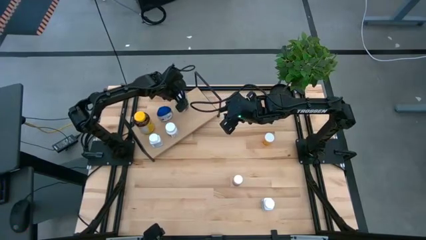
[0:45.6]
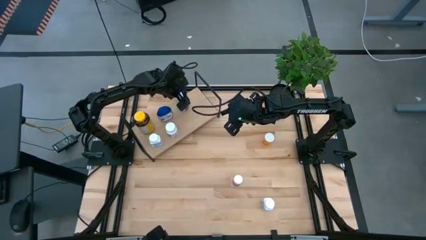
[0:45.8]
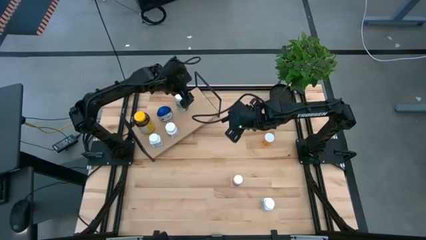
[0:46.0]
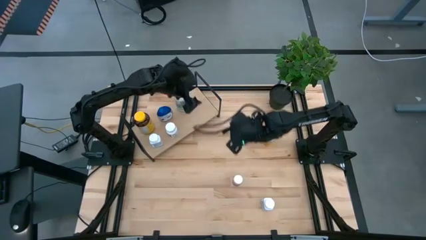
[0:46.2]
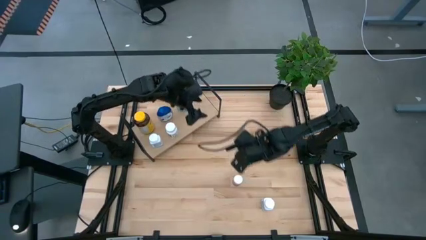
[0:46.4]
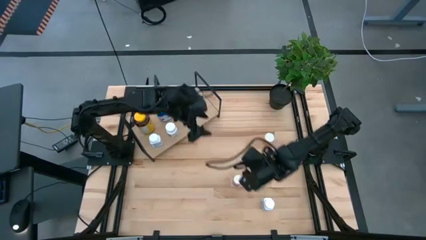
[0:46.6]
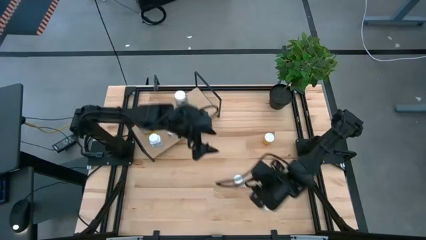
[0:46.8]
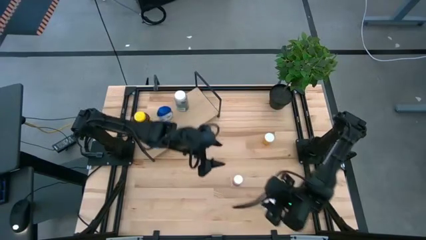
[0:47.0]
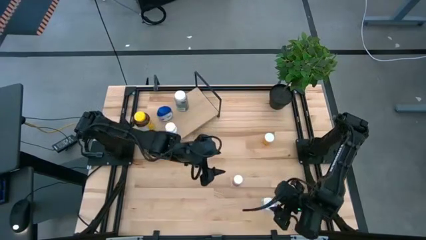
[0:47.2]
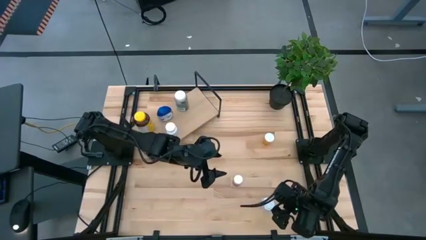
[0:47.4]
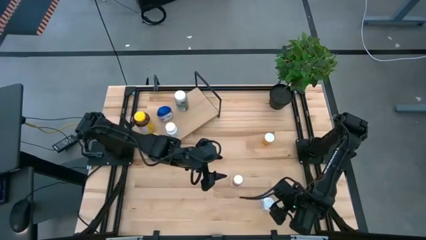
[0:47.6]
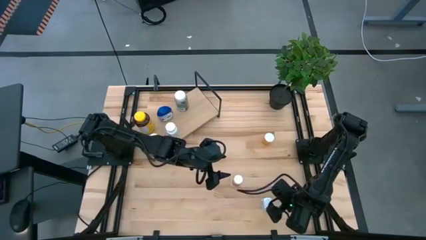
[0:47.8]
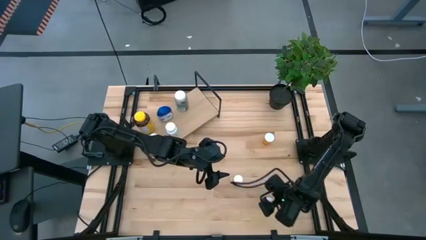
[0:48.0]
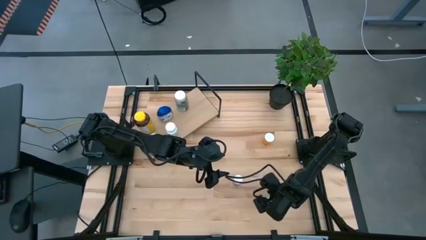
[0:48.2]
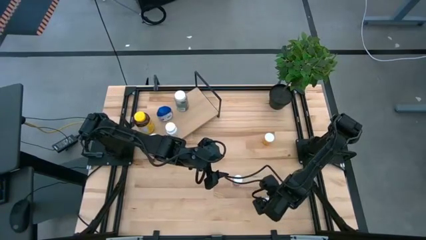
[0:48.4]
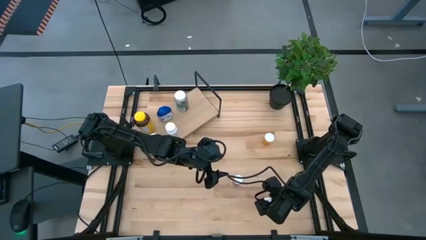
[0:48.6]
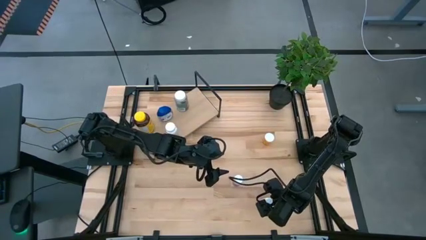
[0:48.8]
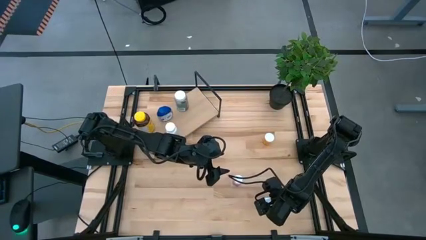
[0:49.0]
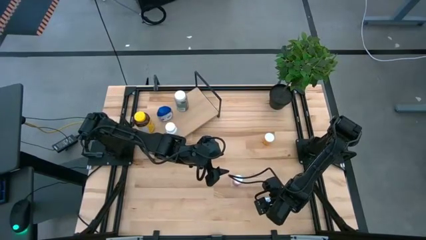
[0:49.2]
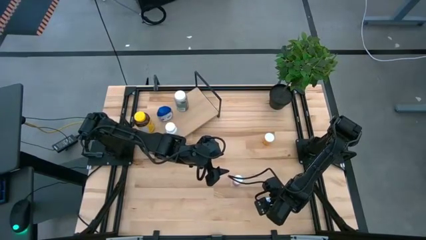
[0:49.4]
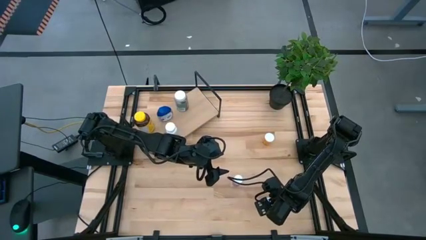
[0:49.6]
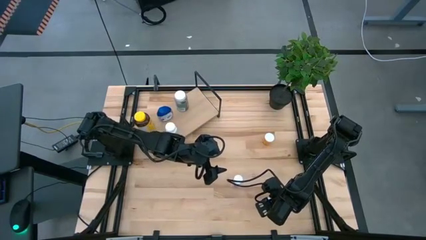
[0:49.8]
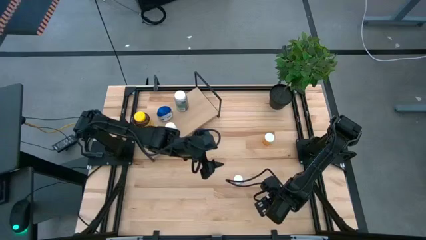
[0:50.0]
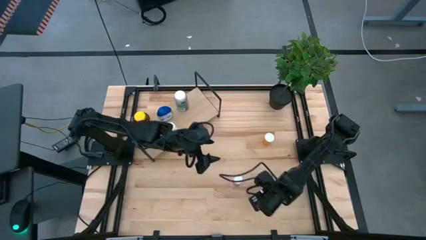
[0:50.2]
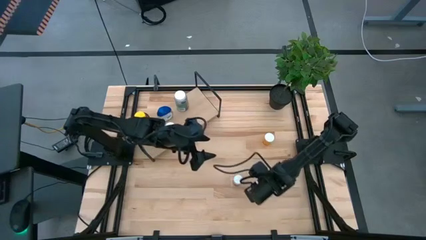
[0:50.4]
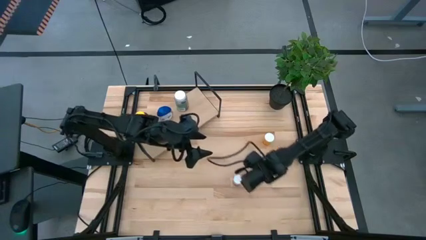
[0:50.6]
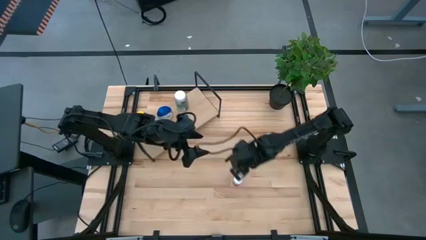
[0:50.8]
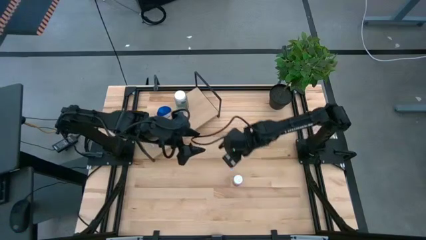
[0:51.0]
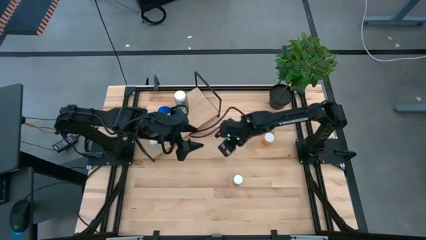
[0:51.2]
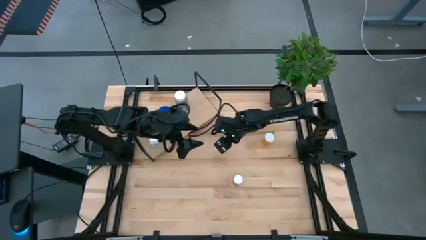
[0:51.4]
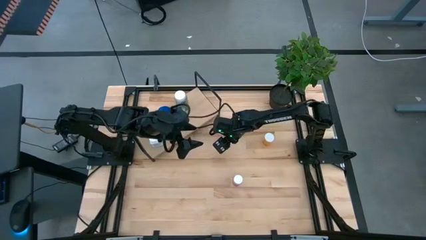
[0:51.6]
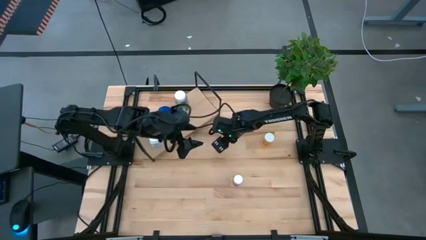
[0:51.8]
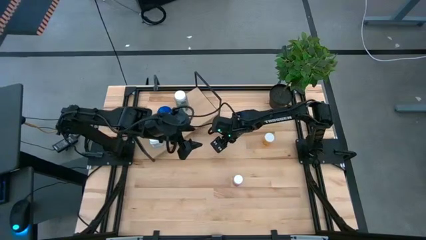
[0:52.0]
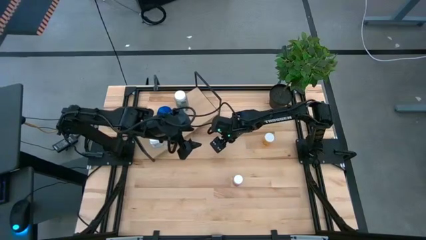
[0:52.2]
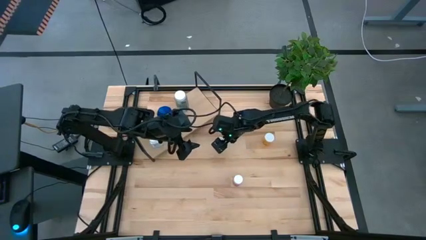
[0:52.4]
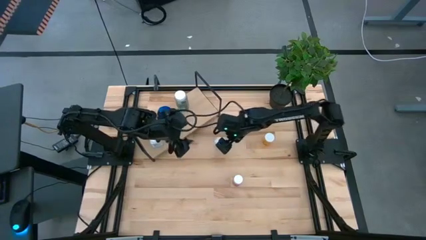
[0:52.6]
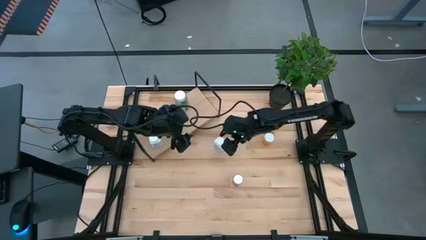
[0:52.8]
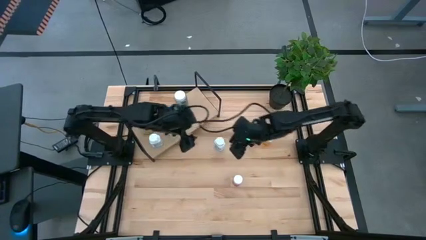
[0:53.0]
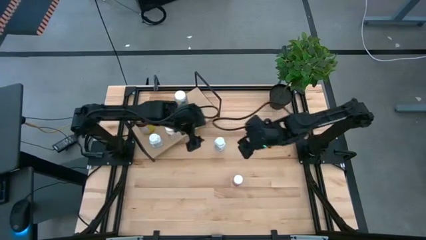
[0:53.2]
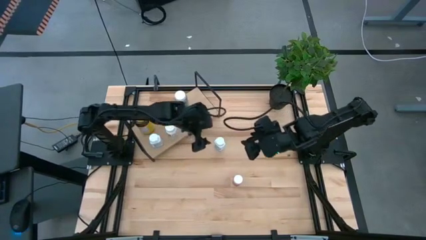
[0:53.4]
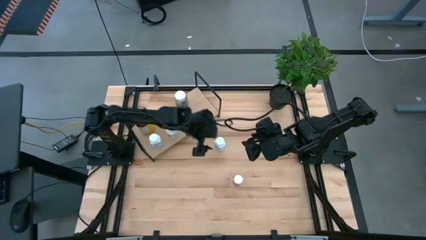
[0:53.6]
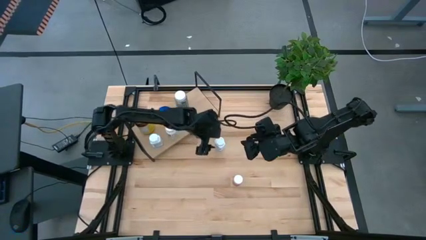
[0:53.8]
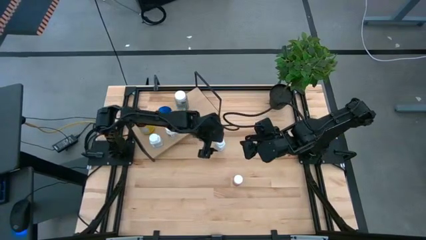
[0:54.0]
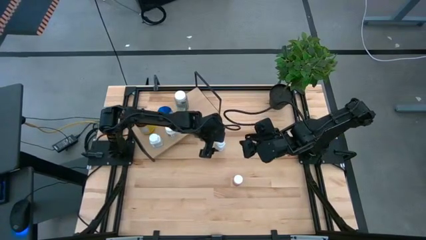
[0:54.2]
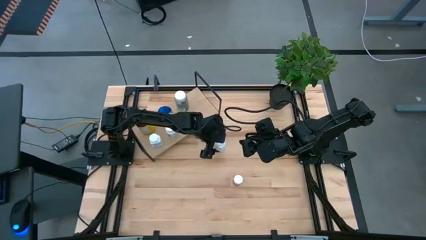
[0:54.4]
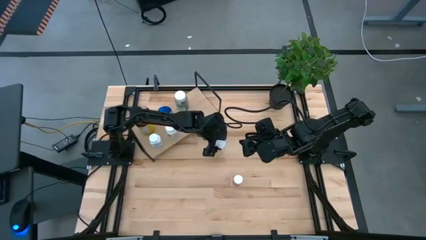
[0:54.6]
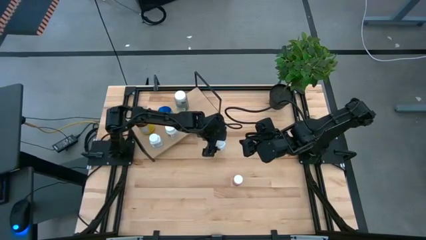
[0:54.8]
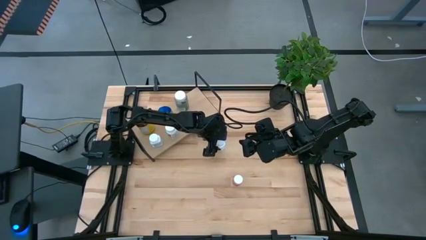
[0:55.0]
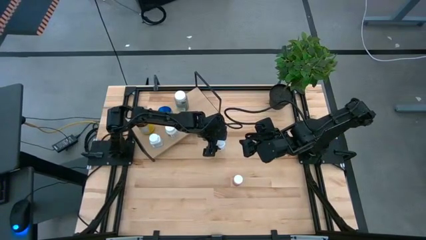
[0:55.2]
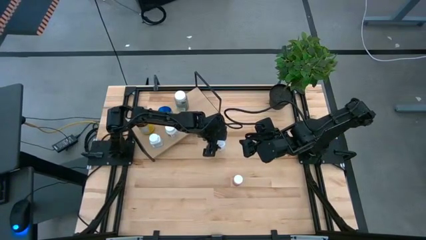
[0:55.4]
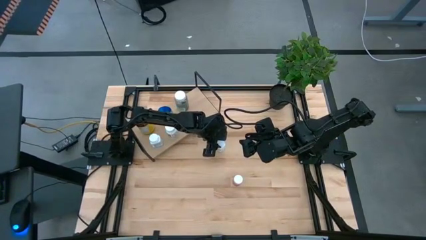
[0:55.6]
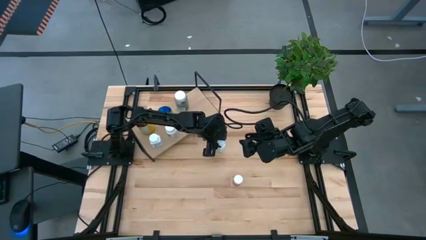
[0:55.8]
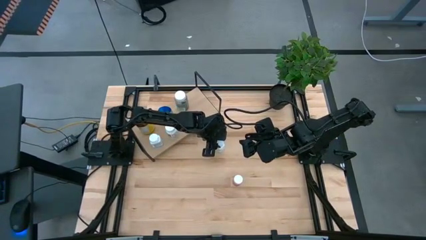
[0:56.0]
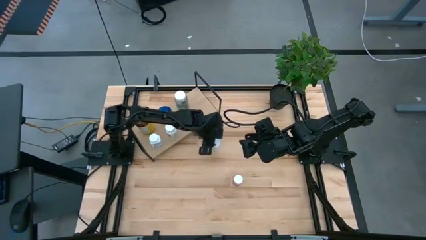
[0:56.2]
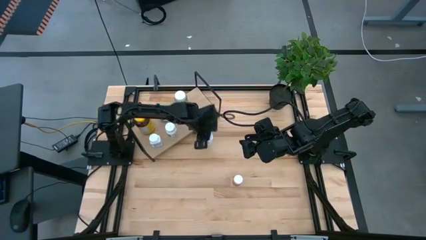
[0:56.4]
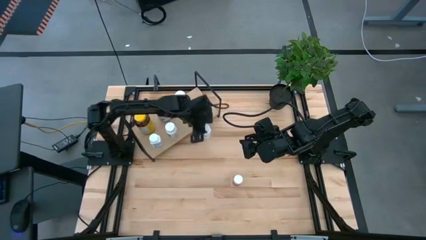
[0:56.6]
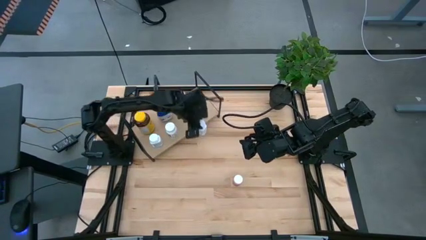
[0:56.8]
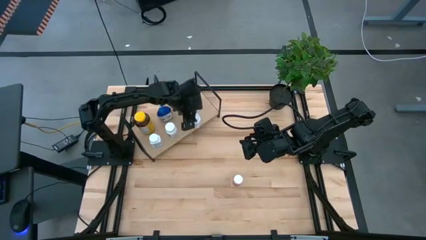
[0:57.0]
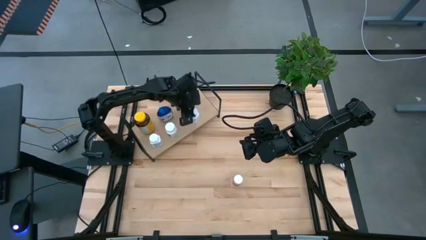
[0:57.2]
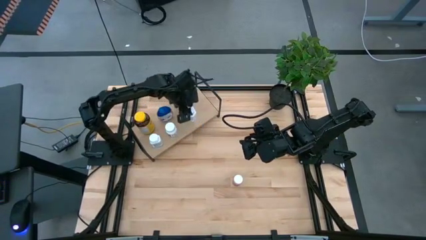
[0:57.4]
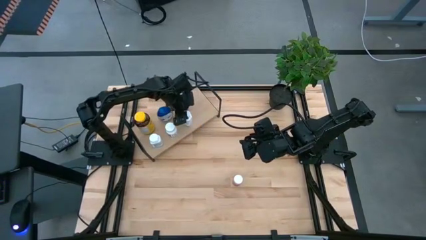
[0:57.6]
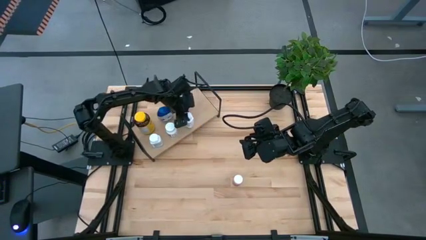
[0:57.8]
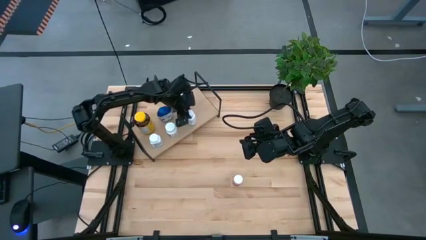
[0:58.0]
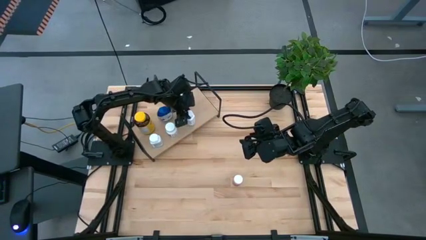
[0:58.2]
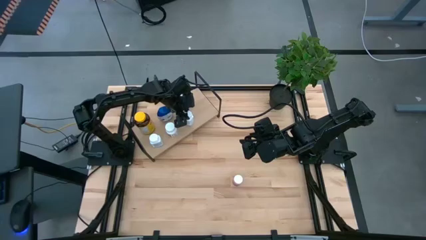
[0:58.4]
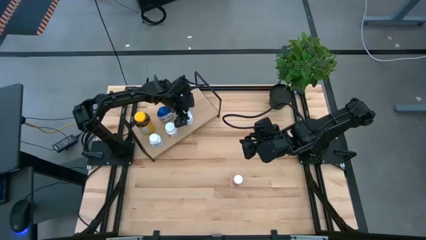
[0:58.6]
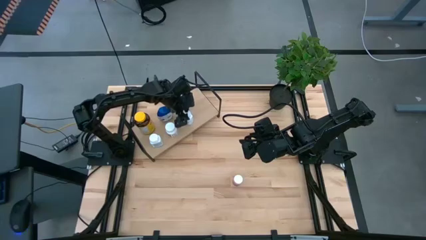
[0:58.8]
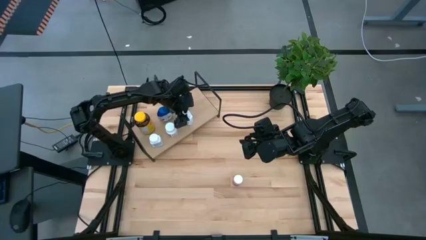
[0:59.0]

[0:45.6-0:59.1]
Task: Pick and place medicine bottles onto shelf by color
Put the light blue medicine bottle on the shelf
